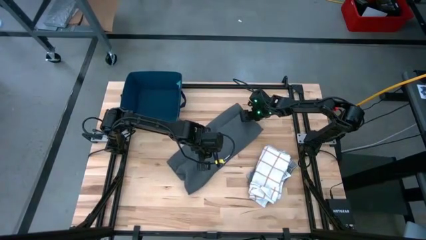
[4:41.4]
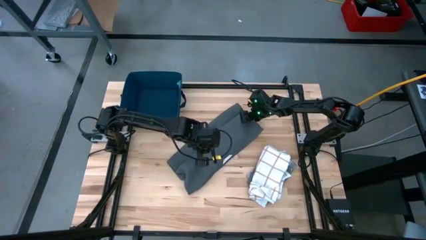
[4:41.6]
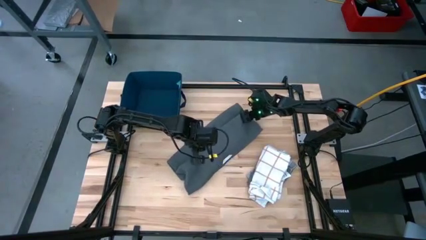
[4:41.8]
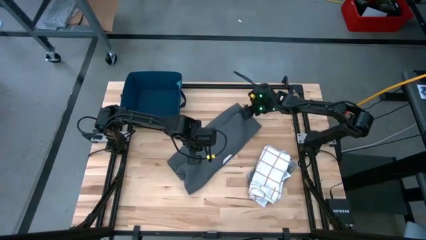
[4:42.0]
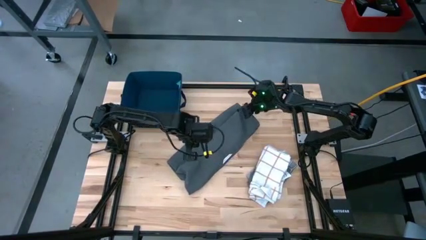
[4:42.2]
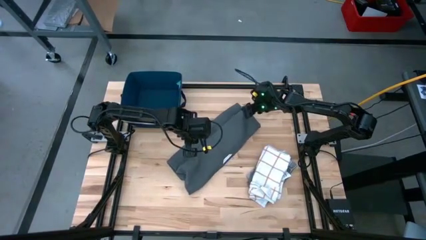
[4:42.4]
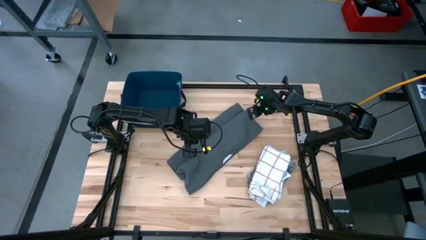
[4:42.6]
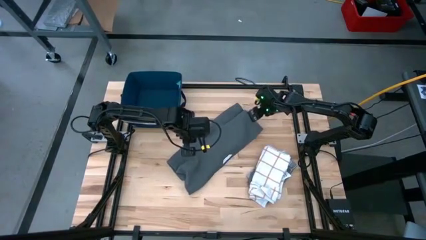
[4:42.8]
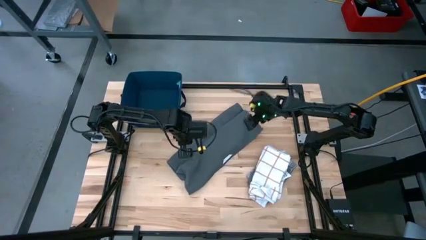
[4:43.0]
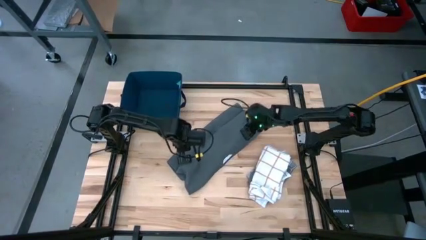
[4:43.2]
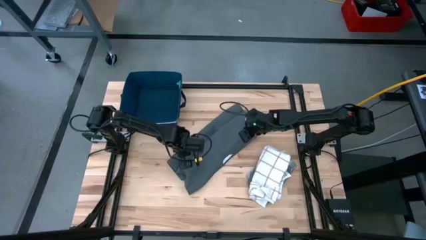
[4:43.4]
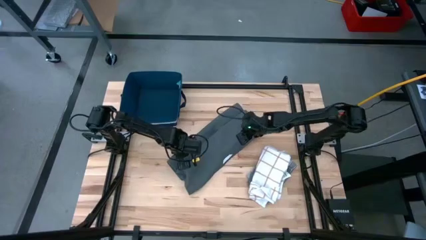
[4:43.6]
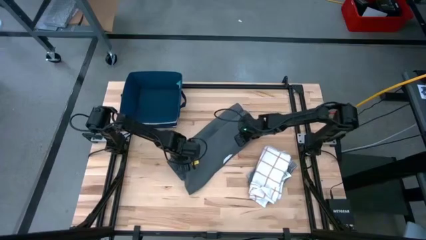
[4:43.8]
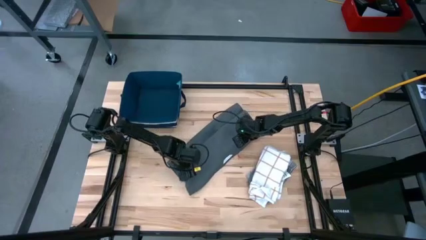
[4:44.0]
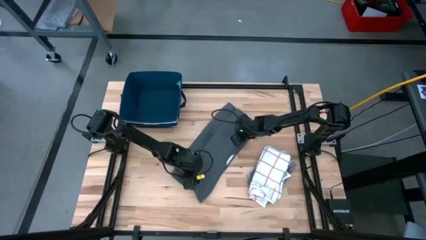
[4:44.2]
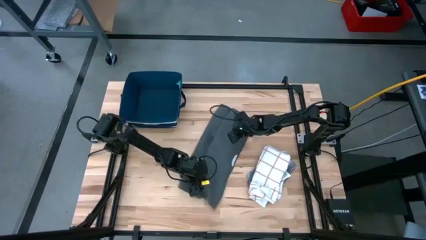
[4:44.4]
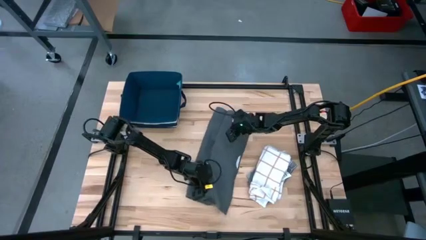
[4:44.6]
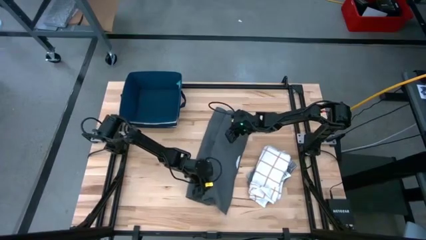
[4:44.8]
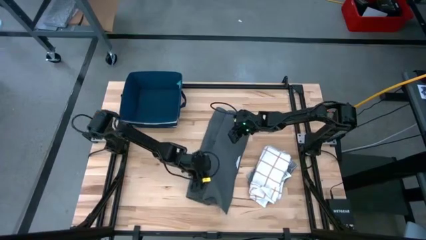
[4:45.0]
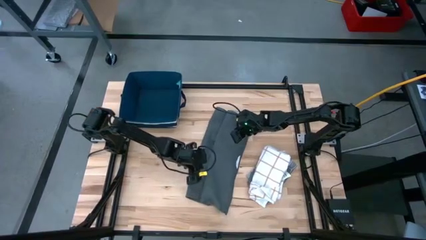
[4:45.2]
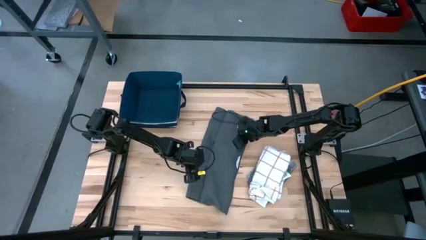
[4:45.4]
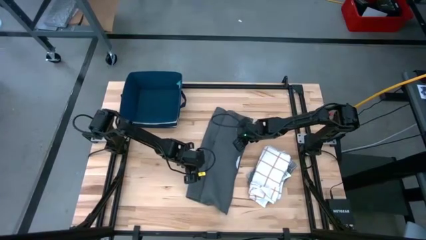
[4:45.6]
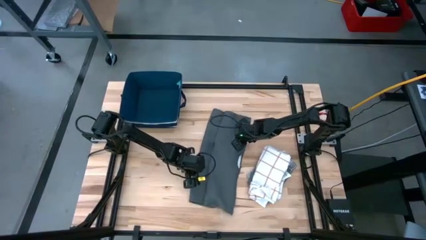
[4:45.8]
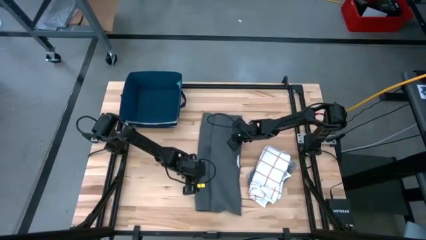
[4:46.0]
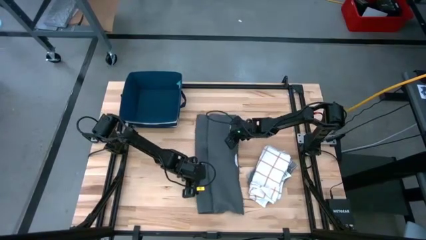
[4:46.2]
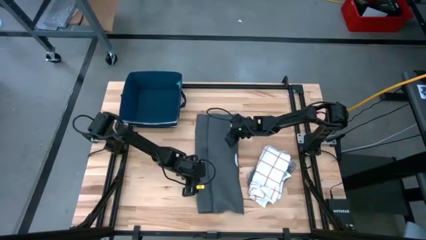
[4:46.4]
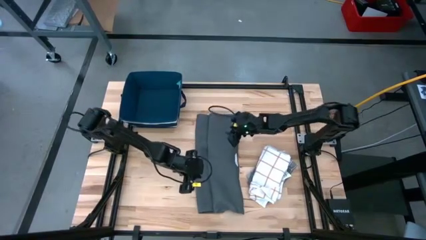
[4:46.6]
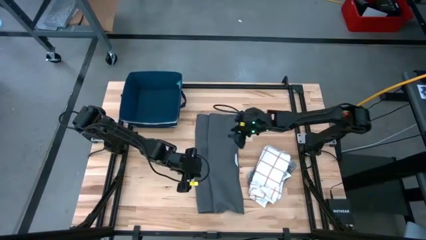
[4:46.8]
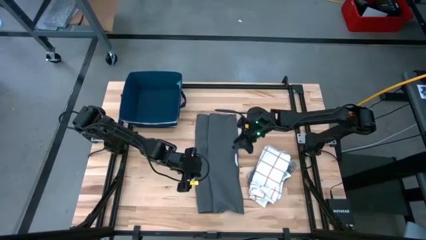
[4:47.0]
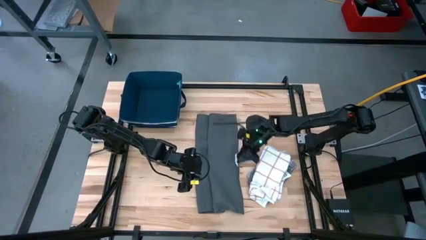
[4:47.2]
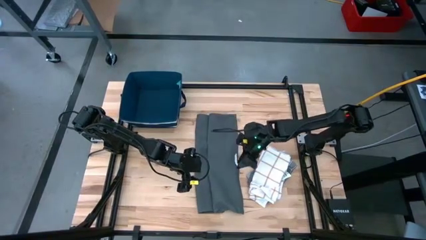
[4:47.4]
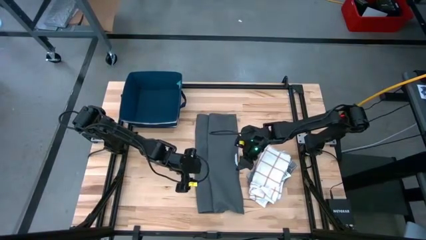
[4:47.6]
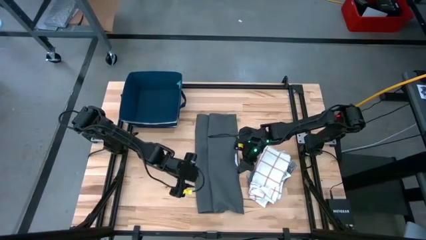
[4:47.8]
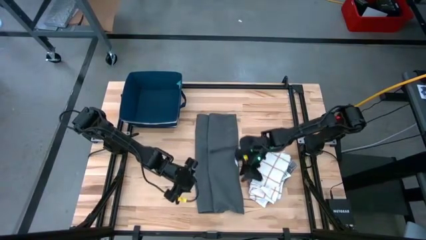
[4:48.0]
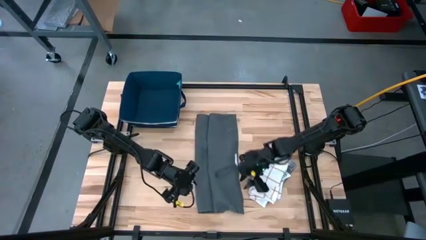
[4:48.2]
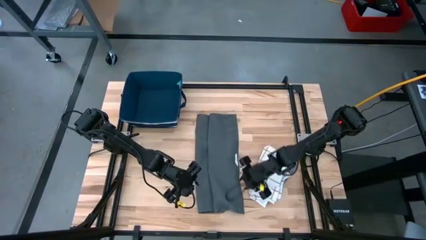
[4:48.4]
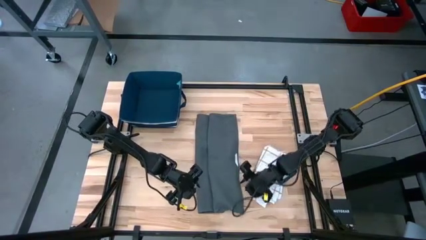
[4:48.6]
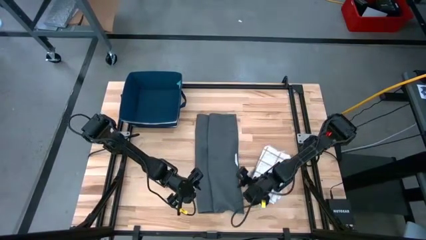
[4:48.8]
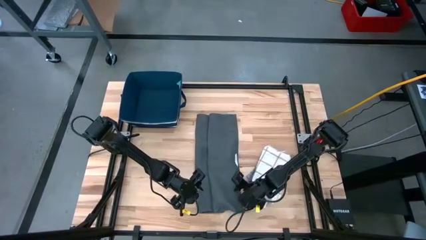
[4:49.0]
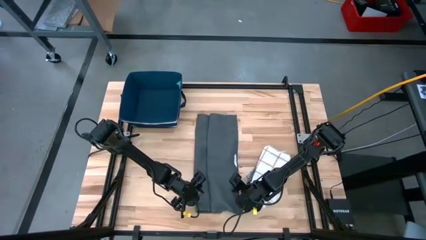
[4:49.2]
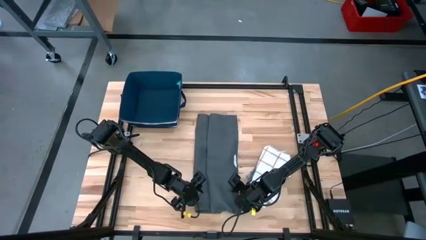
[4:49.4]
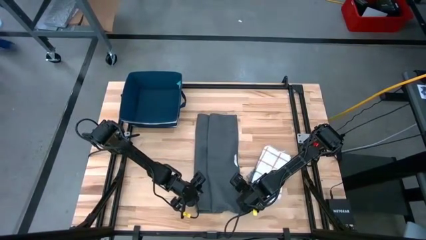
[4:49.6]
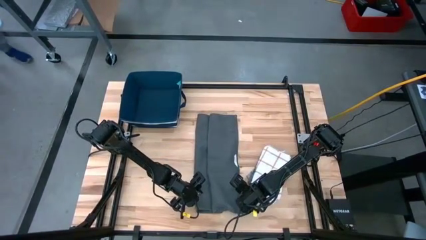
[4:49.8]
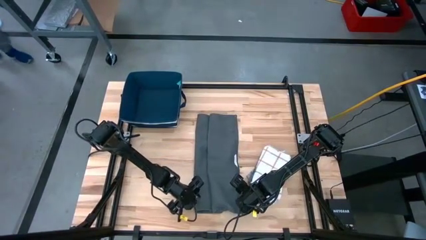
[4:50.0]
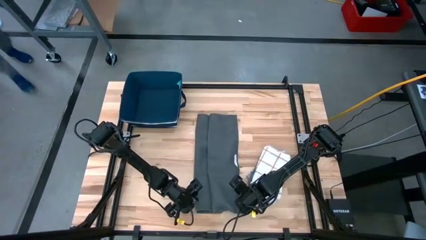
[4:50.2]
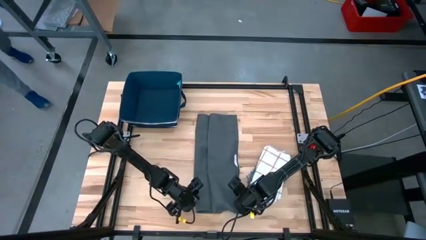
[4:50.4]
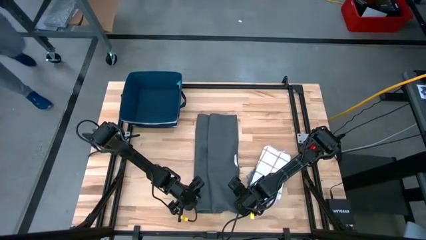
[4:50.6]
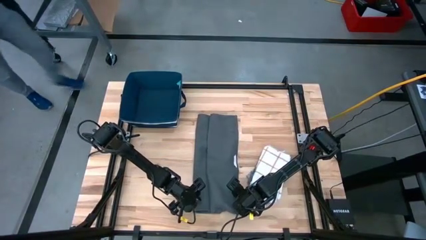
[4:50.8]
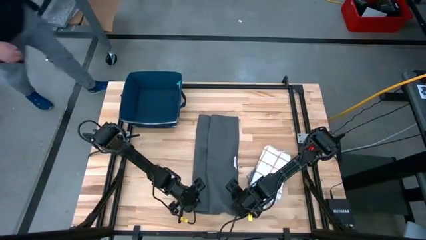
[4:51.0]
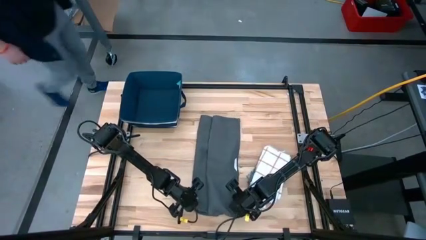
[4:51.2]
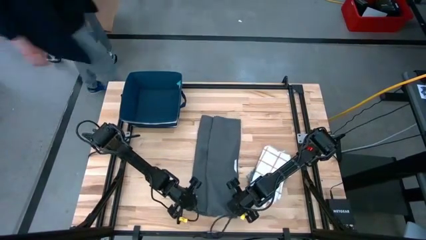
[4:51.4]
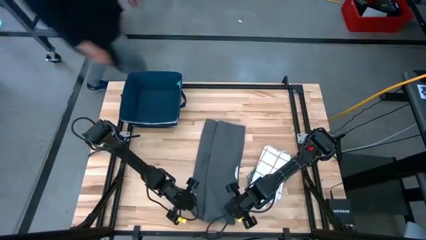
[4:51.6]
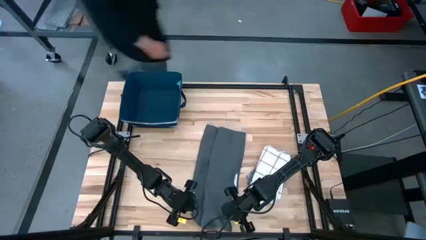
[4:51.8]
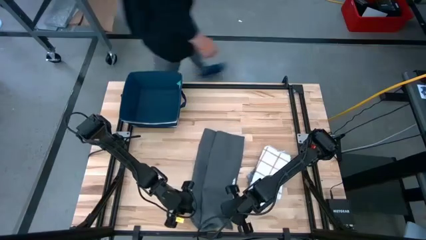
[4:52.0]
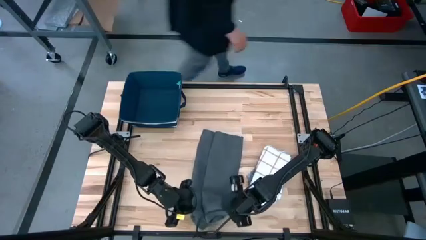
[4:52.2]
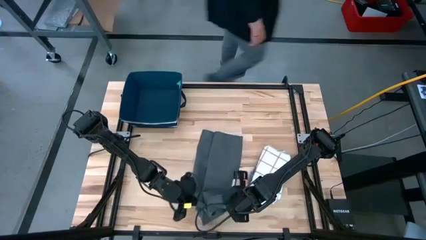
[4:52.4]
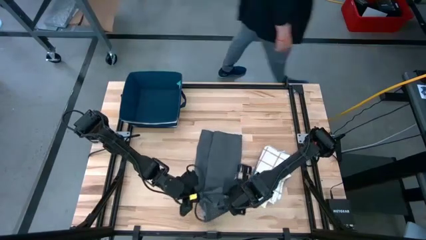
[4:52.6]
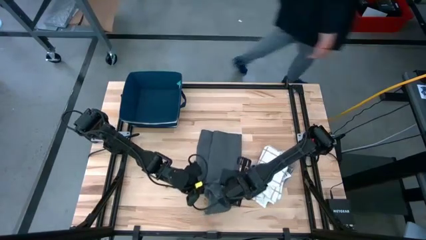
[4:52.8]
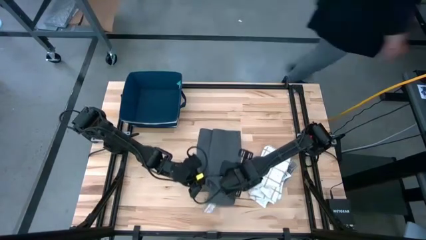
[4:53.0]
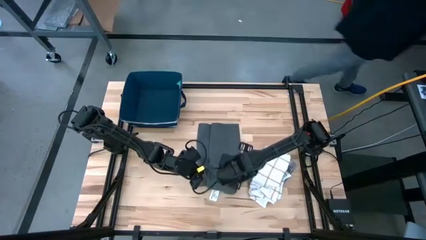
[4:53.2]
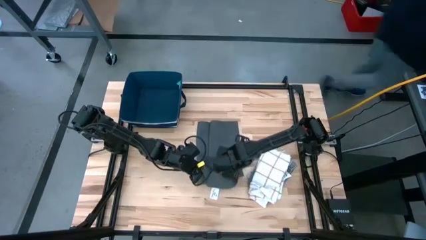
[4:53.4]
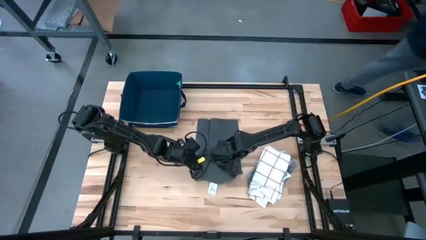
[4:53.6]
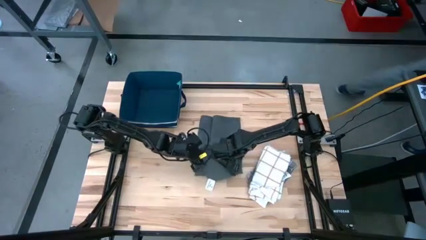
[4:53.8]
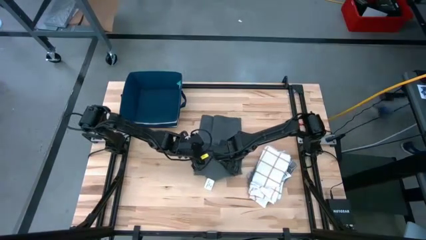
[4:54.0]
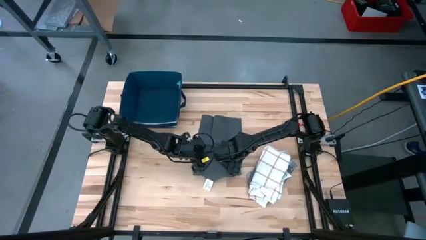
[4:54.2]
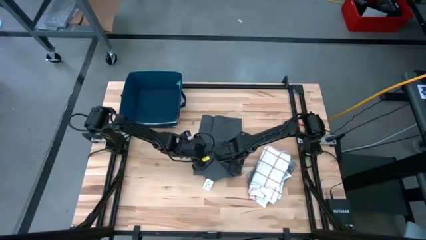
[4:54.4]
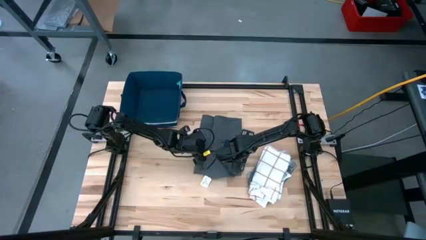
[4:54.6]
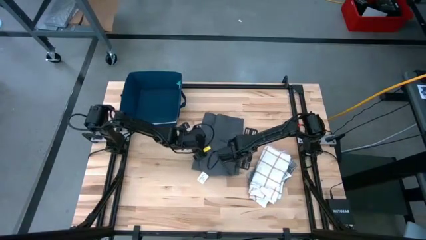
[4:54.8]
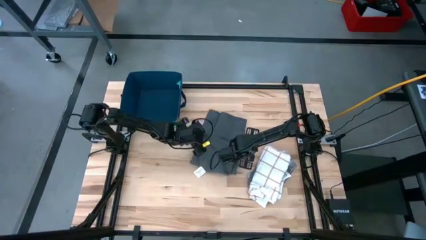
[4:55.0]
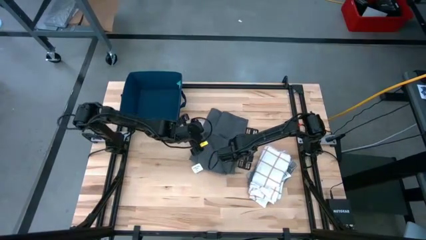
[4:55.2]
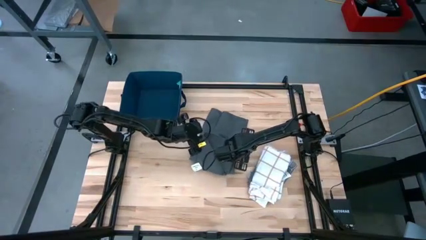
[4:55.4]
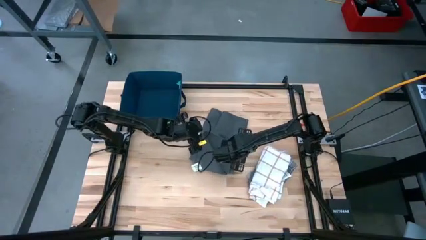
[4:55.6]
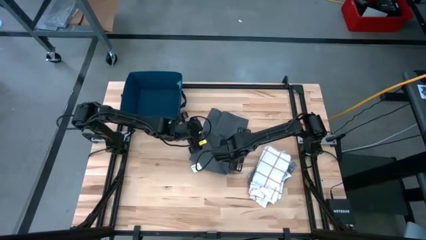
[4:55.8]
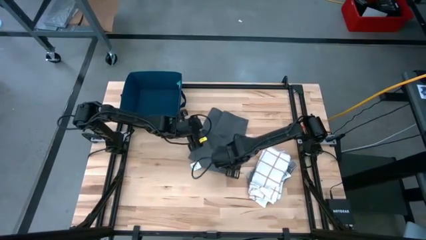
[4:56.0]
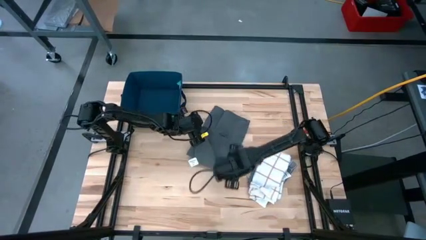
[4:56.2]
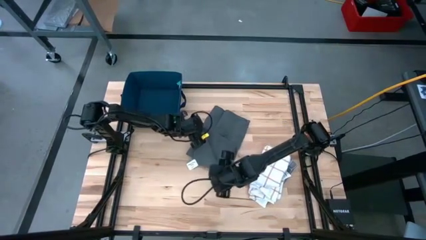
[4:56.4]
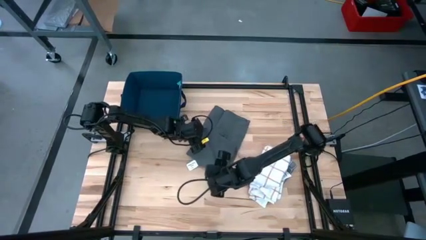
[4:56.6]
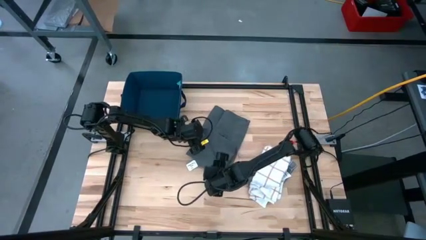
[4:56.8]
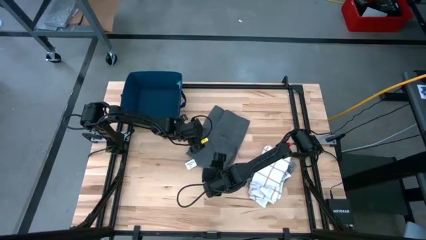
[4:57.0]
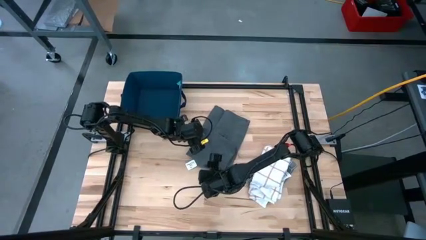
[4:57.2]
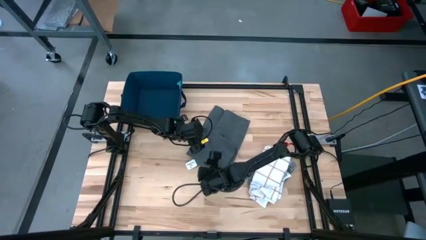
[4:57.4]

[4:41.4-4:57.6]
Task: Fold towel
Fold the gray towel
